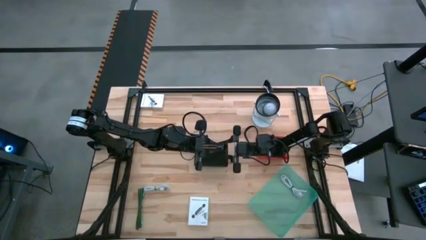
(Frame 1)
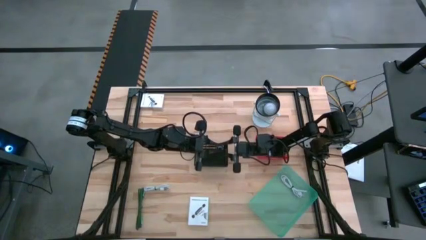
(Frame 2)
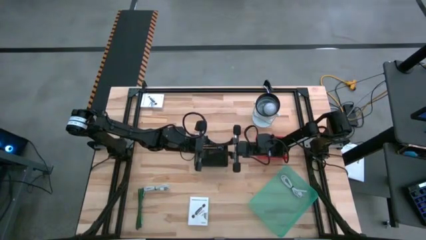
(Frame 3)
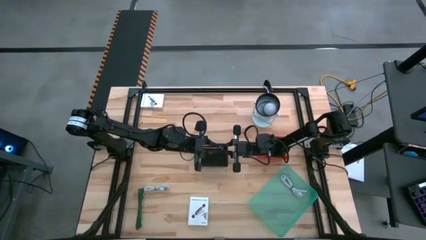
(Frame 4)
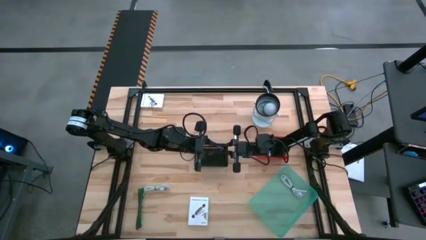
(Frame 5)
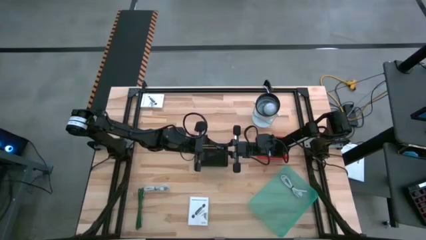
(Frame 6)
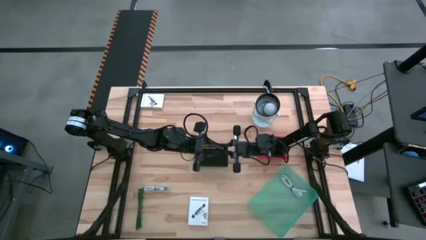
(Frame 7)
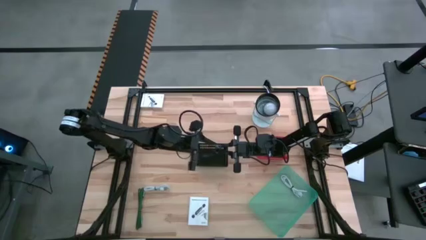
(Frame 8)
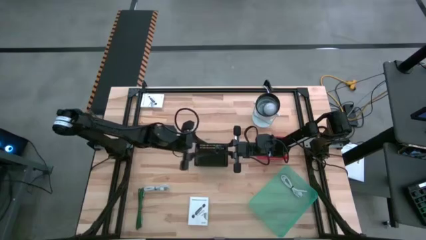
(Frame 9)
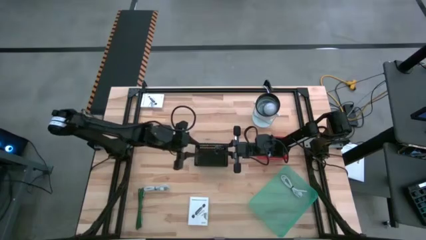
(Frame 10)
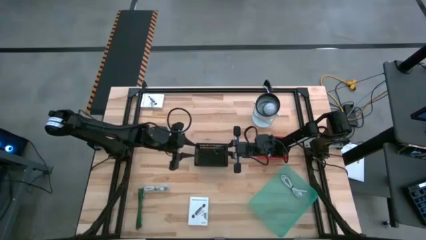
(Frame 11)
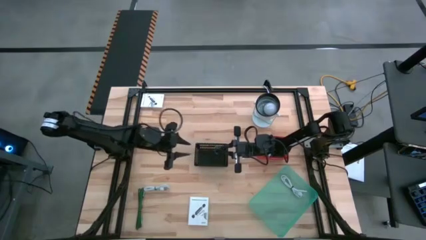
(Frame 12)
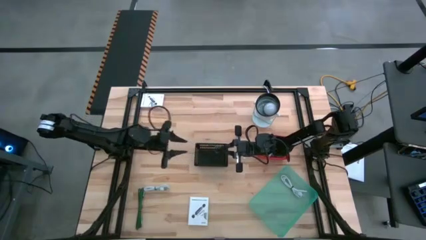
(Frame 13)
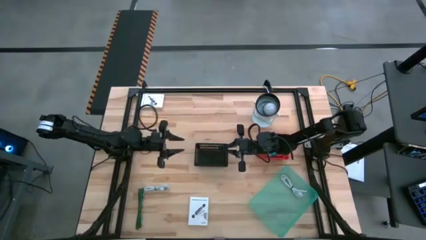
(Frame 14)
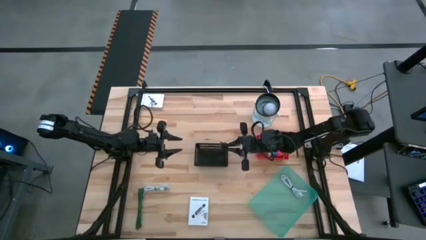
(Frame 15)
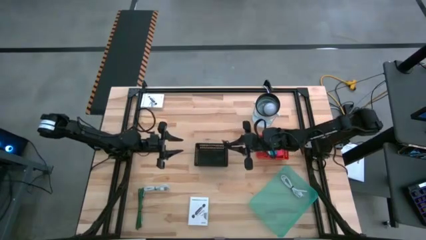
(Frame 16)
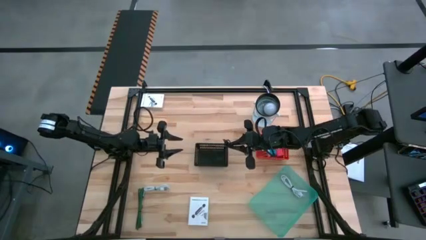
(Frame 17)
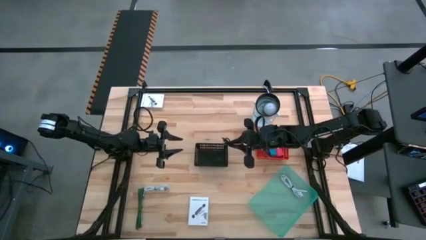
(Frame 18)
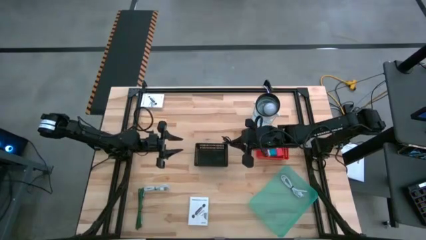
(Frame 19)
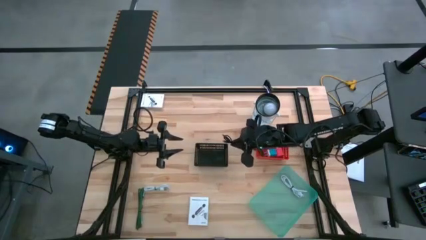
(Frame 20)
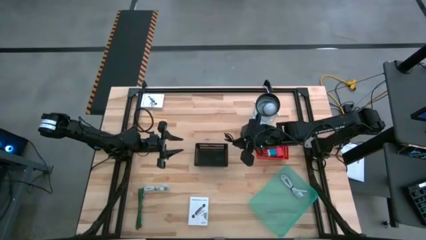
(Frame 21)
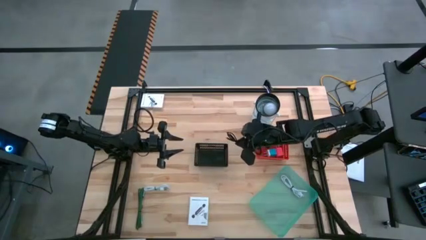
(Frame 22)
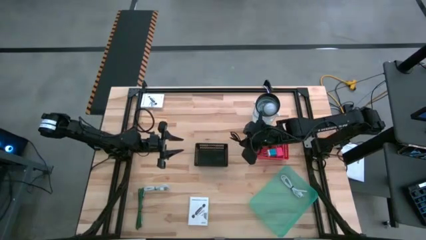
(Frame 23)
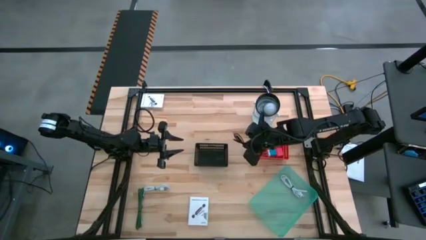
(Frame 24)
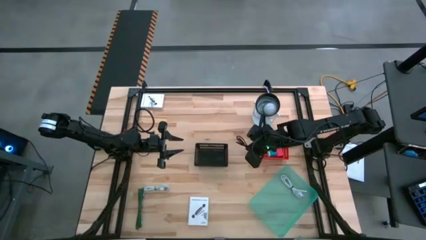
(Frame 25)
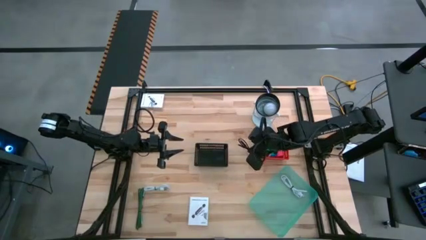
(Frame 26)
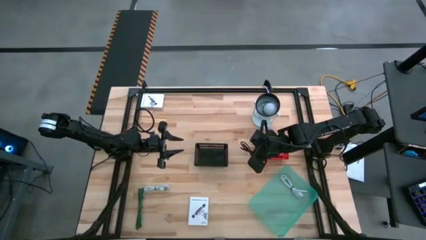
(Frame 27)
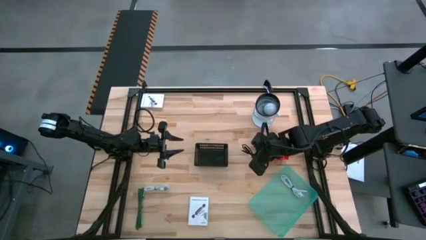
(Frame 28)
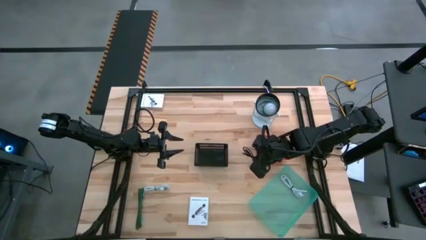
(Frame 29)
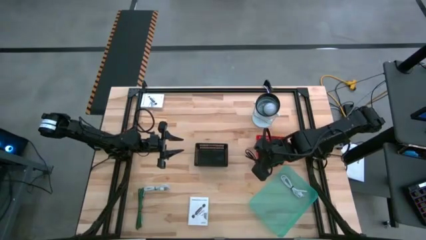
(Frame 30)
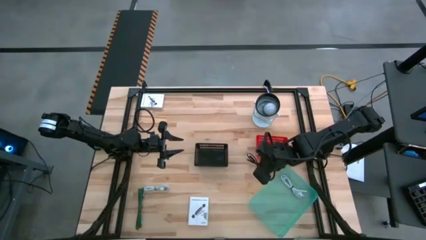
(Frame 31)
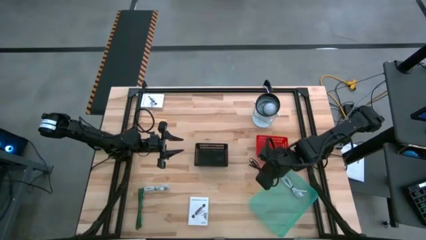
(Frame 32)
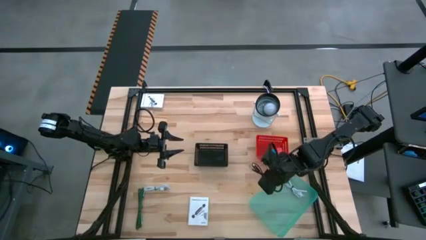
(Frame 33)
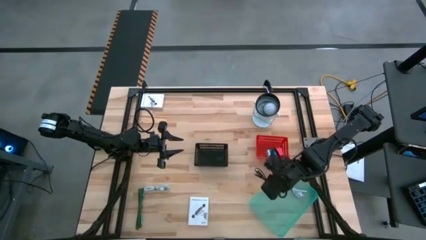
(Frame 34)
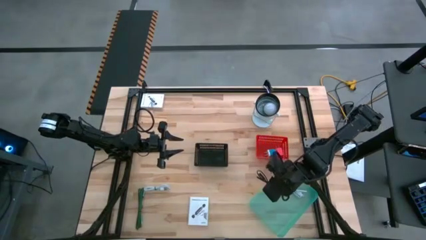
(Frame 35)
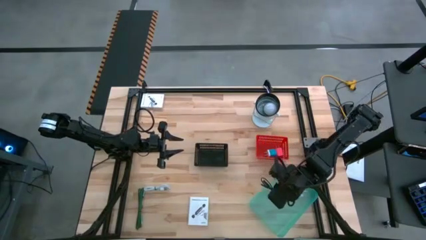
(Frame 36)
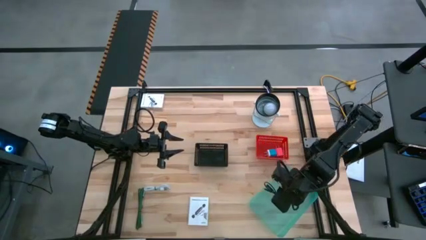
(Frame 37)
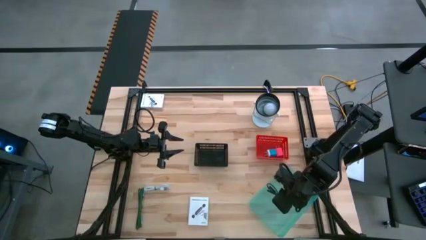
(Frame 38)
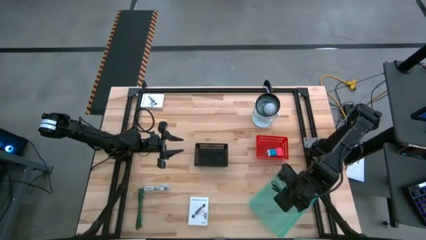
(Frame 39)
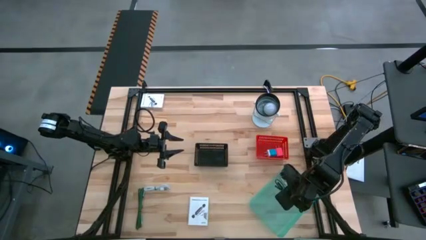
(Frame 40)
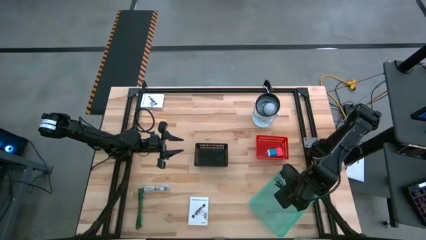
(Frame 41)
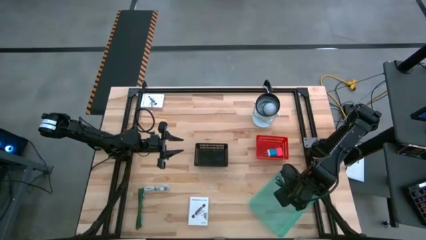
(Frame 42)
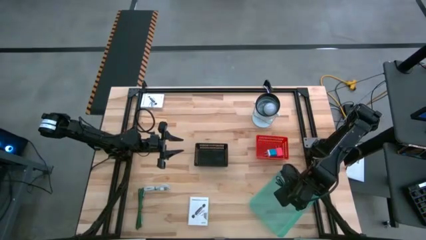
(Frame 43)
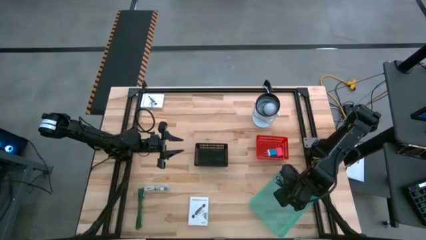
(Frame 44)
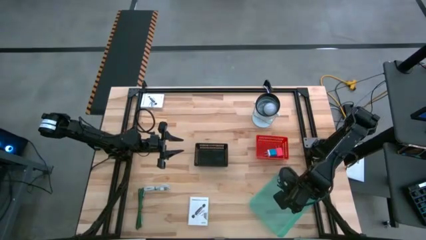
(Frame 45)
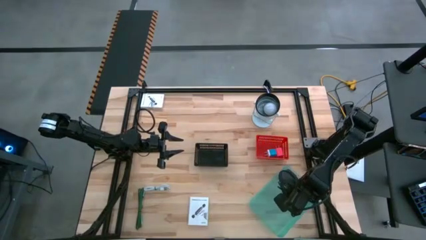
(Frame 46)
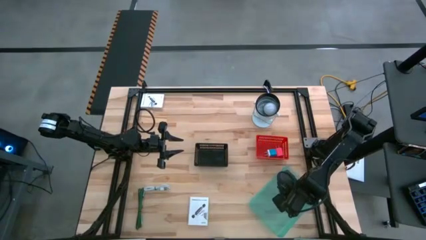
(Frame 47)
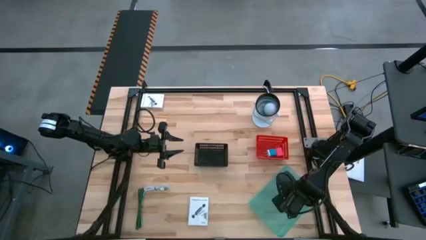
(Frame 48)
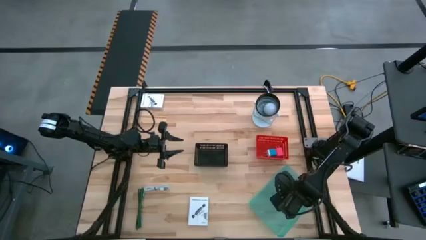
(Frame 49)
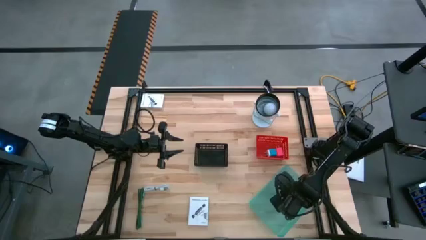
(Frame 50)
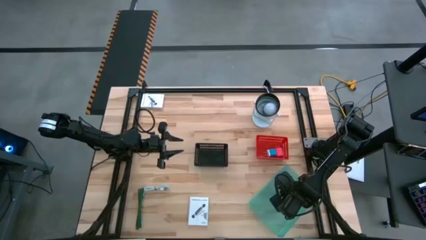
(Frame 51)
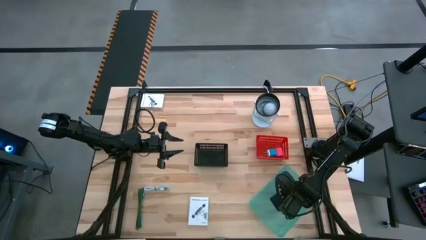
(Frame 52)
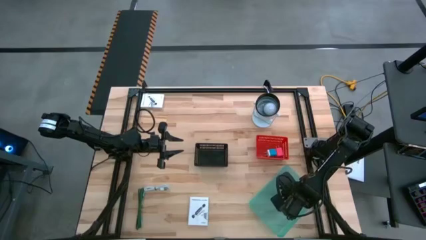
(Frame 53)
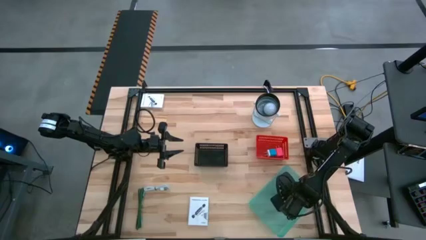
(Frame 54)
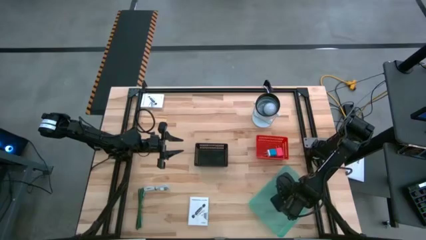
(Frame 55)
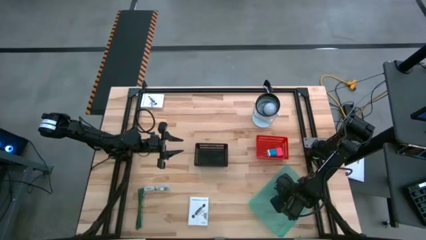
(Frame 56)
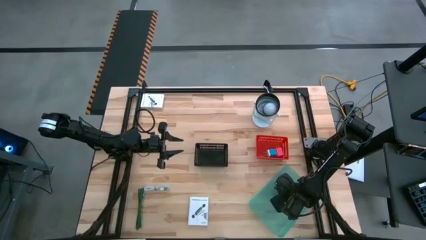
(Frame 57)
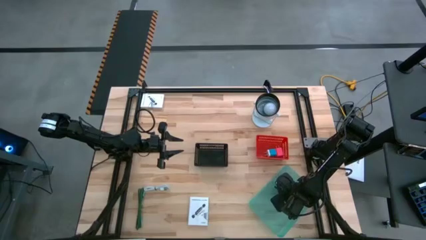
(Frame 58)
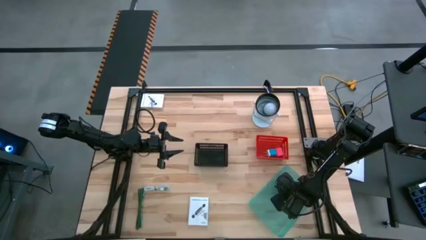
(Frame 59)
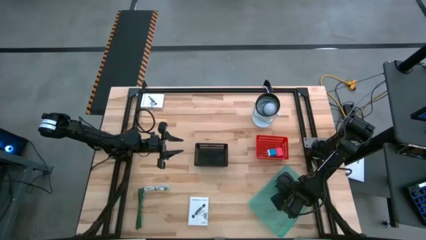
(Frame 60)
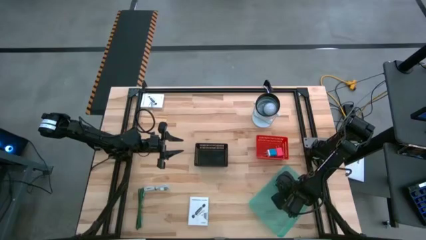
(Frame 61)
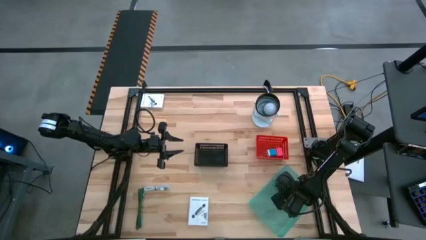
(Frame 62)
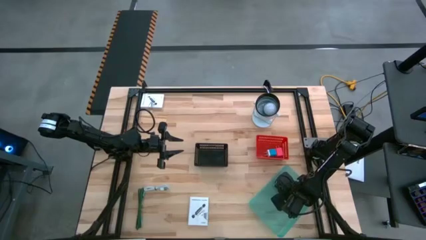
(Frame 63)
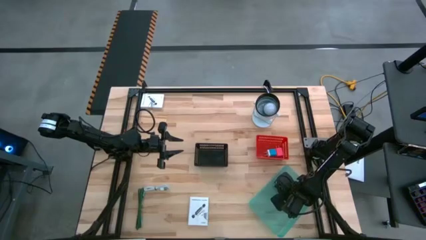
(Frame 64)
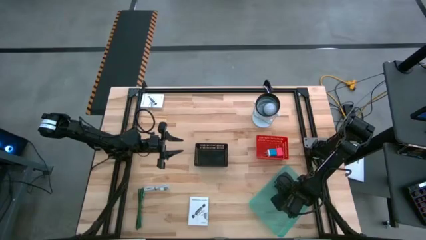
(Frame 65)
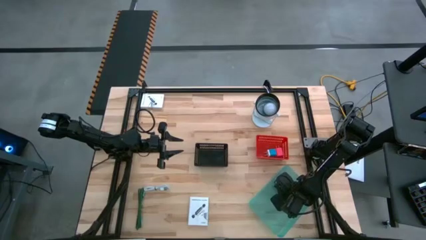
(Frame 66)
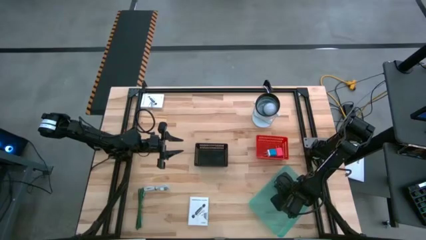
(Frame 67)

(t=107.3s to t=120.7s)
Task: Pick and place items into bin
Put the black charger cable into the blue bin

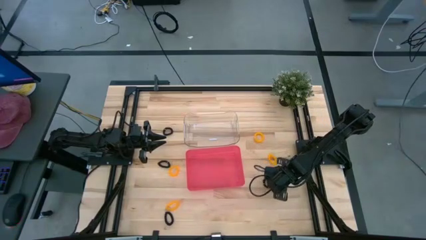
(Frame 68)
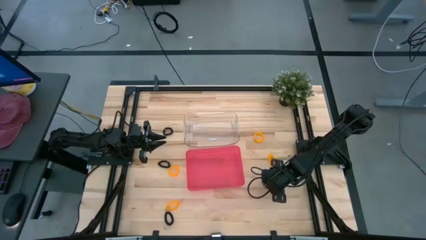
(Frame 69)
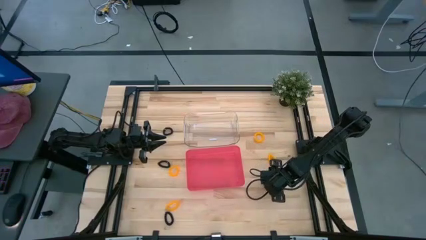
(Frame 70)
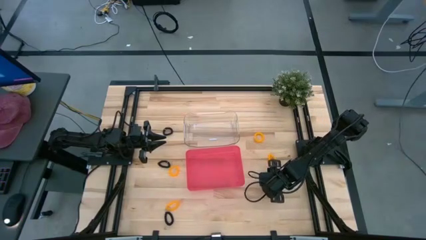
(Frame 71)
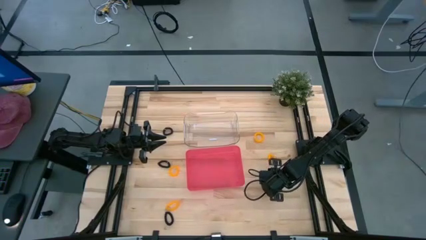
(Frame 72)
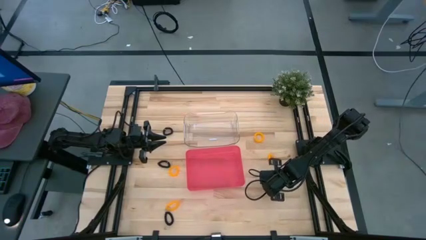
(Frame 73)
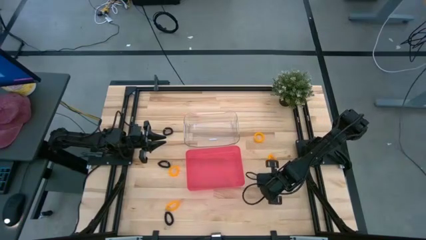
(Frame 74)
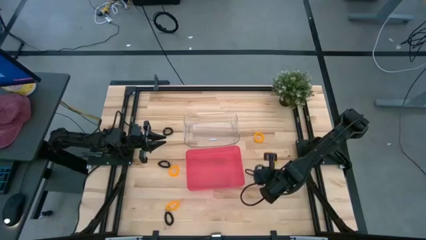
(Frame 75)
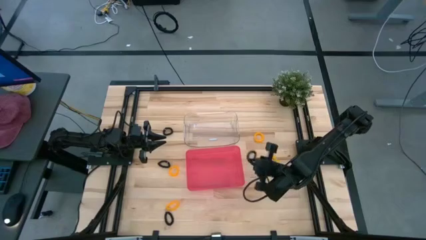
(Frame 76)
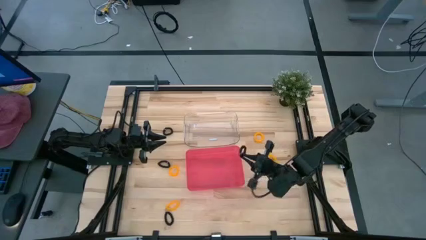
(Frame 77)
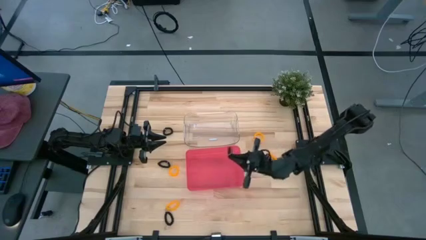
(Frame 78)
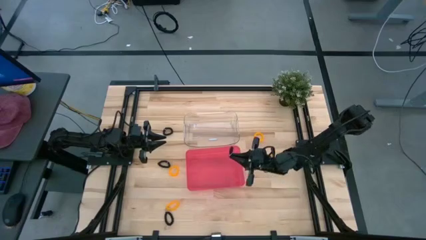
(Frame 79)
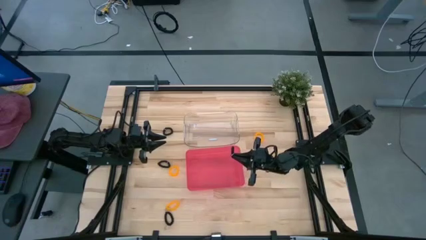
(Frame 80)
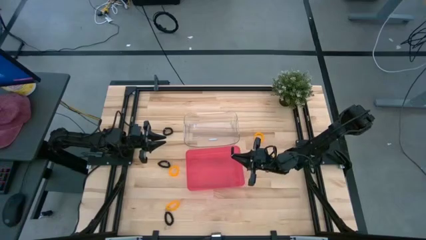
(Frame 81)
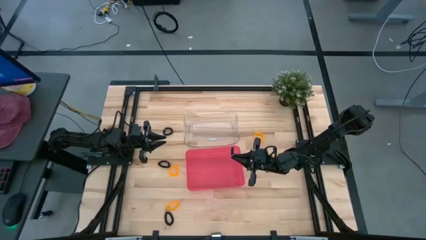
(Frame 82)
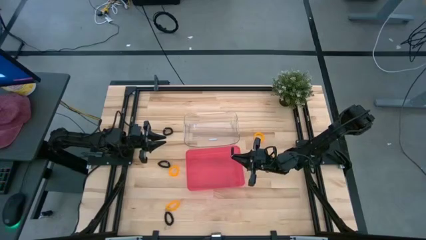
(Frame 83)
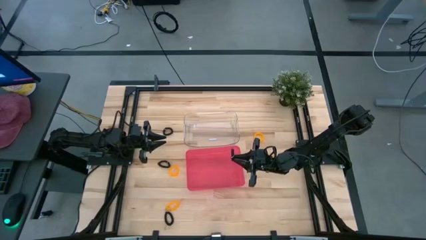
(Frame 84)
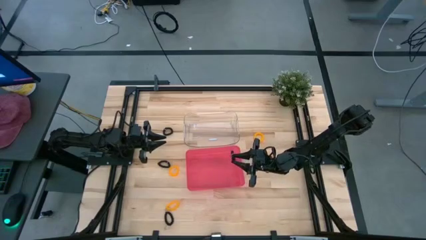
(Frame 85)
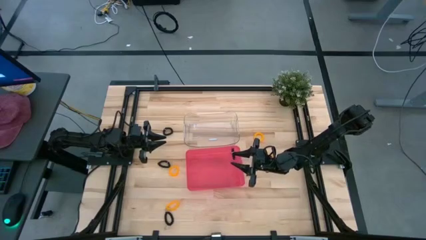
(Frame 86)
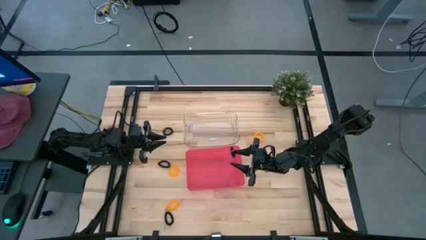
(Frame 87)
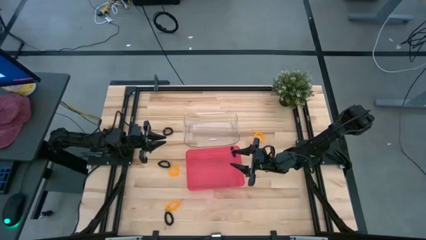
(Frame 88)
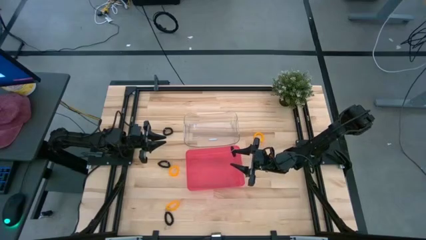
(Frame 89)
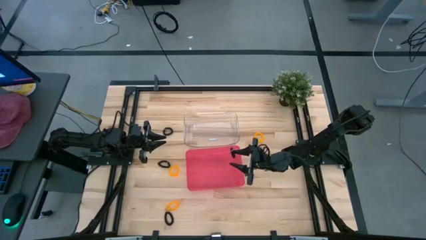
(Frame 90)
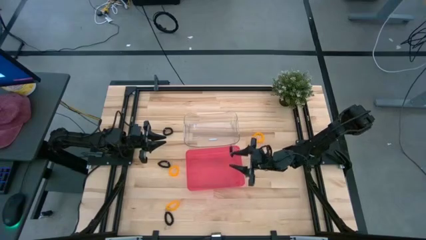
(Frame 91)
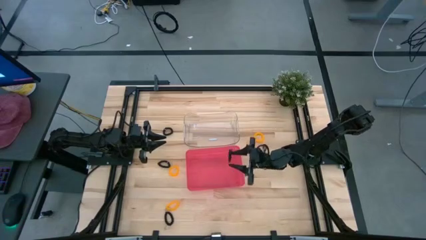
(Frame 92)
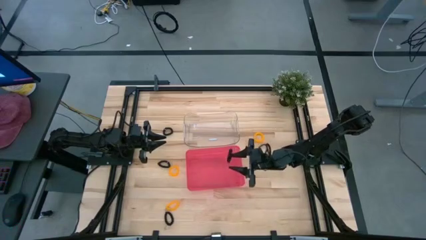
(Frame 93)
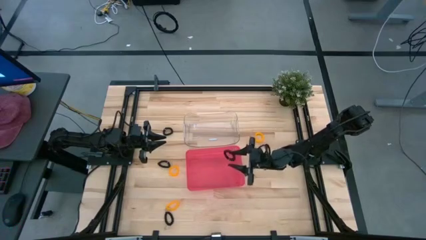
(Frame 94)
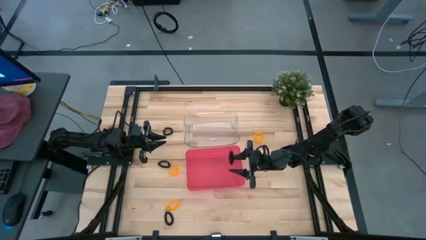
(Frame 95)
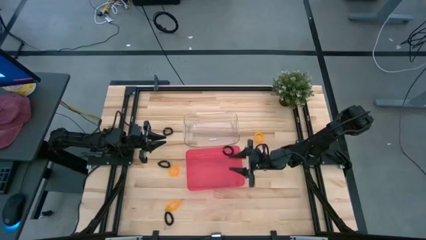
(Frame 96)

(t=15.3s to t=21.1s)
Task: Sort spring keychains
Put the black spring keychain into the red bin
